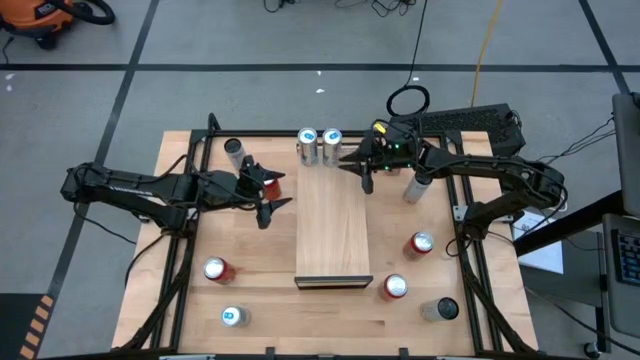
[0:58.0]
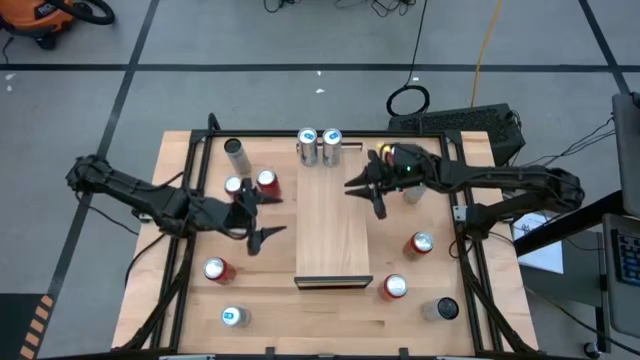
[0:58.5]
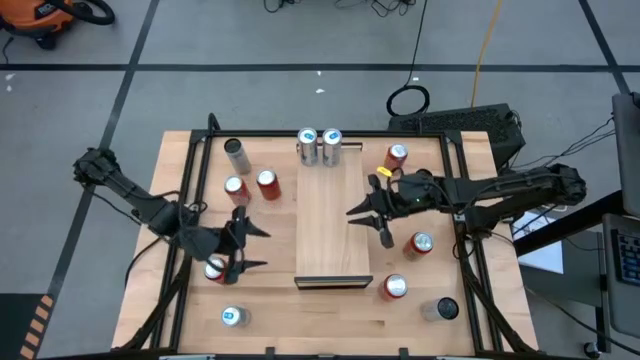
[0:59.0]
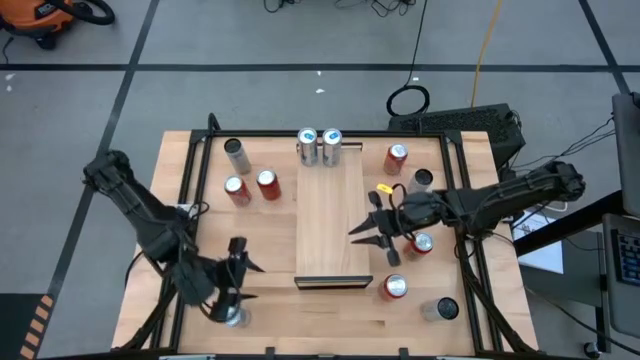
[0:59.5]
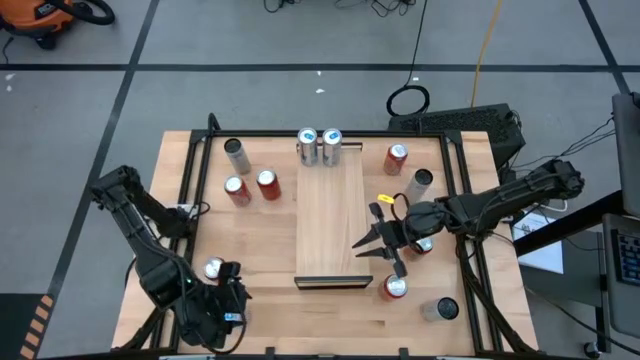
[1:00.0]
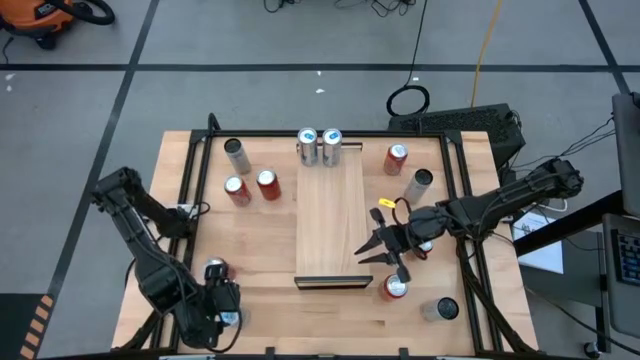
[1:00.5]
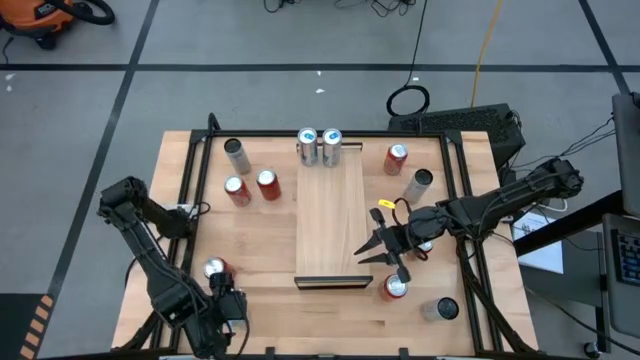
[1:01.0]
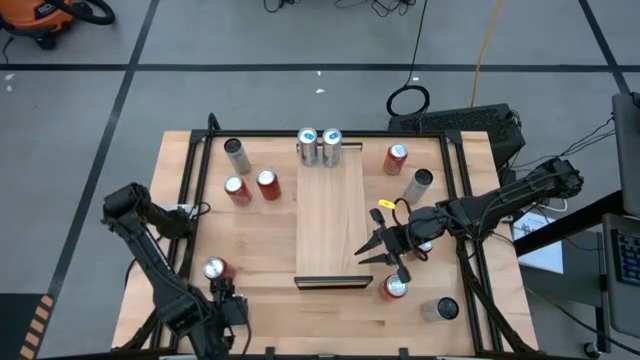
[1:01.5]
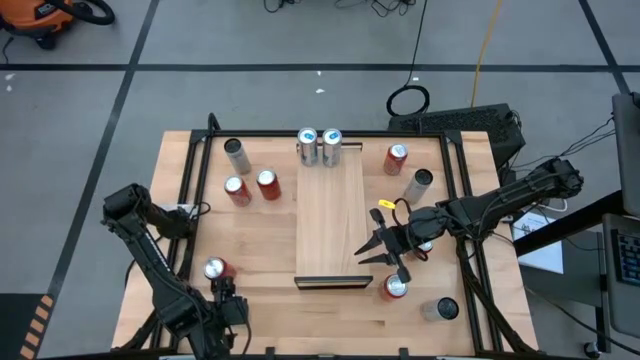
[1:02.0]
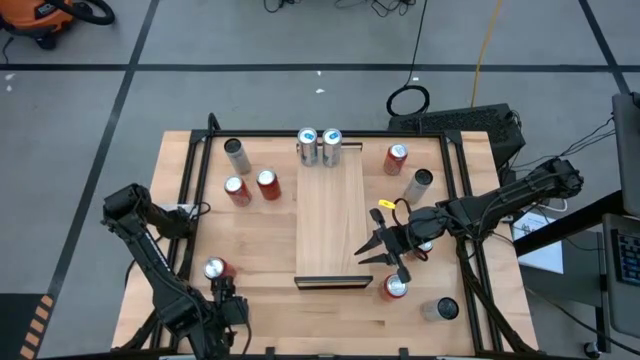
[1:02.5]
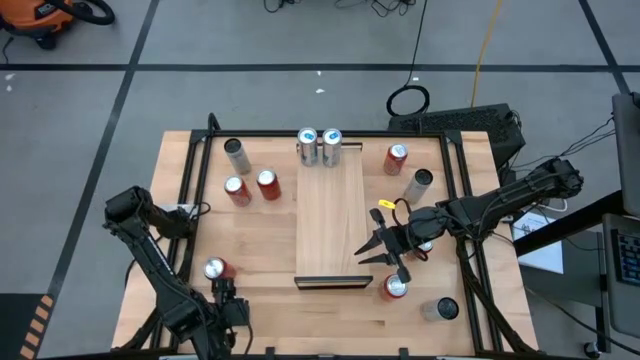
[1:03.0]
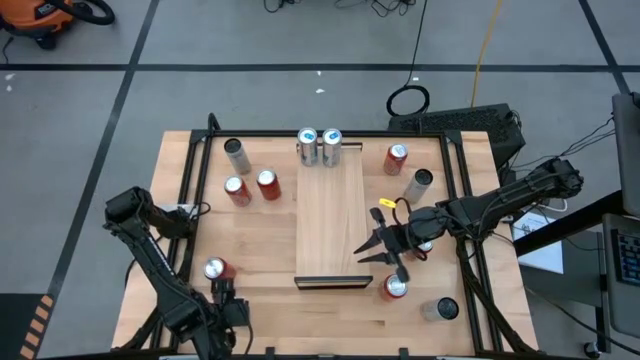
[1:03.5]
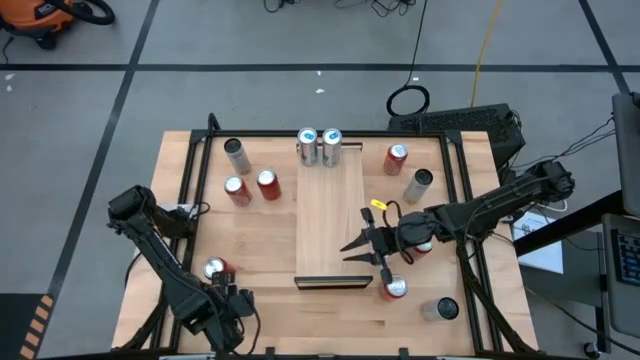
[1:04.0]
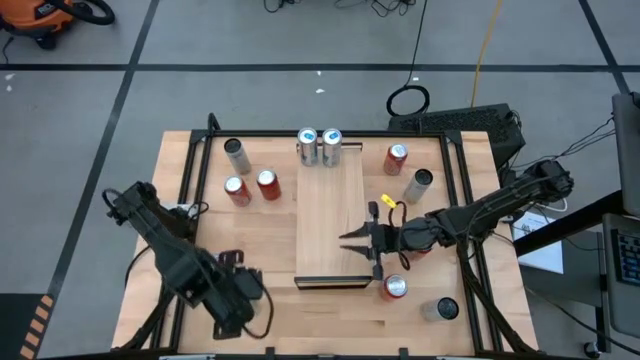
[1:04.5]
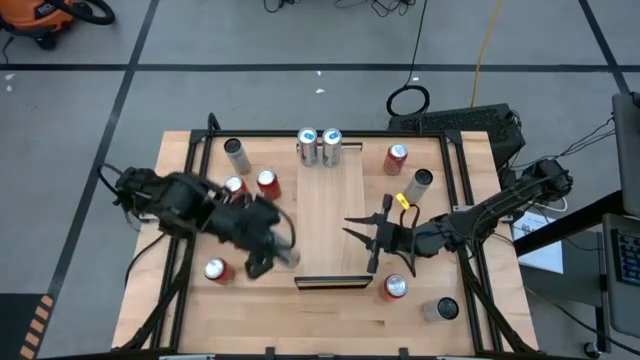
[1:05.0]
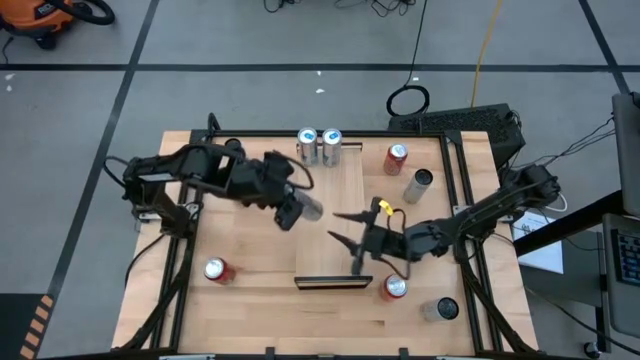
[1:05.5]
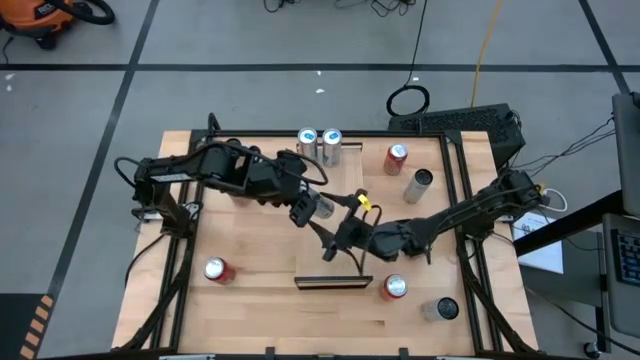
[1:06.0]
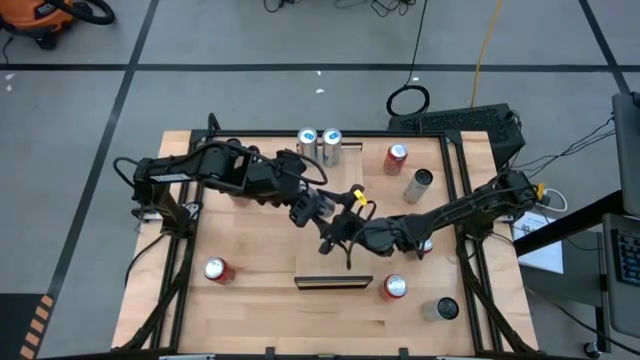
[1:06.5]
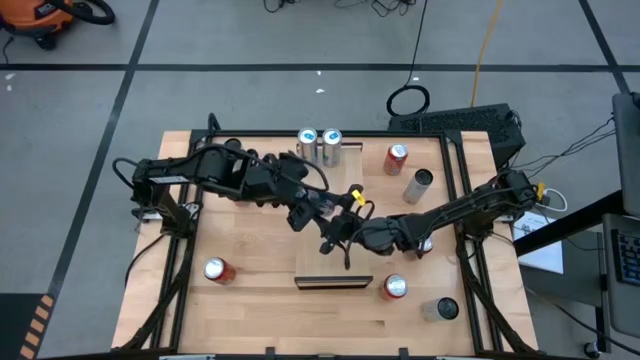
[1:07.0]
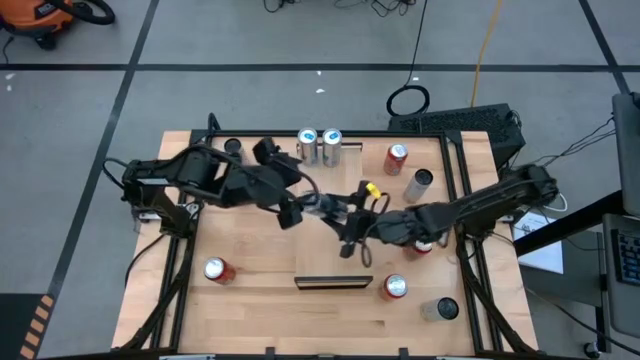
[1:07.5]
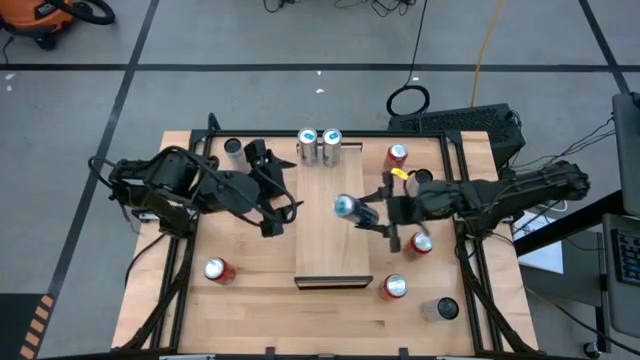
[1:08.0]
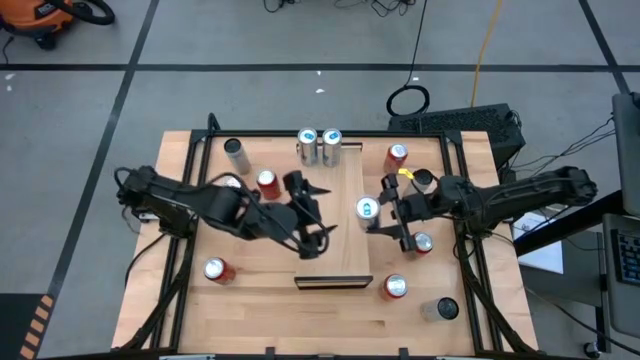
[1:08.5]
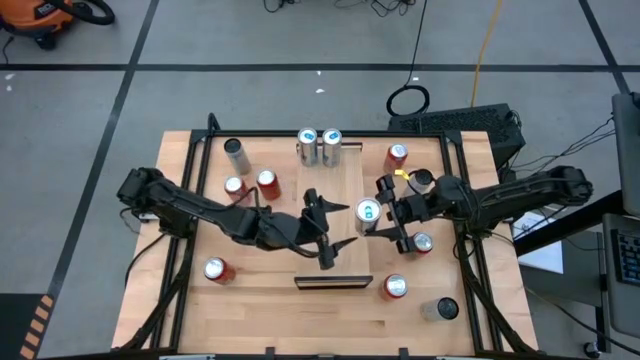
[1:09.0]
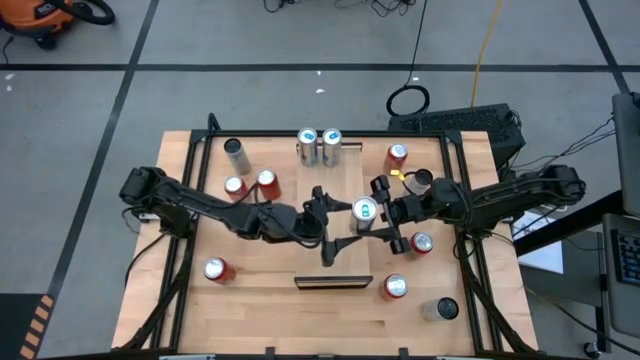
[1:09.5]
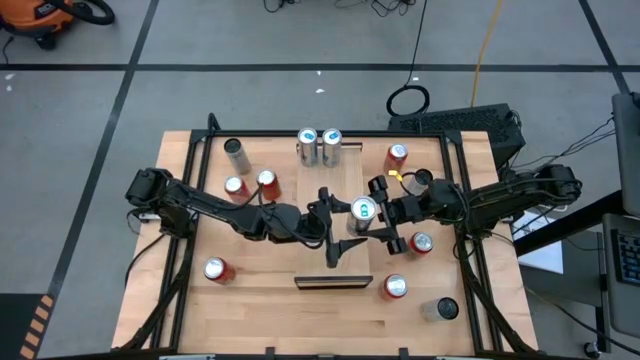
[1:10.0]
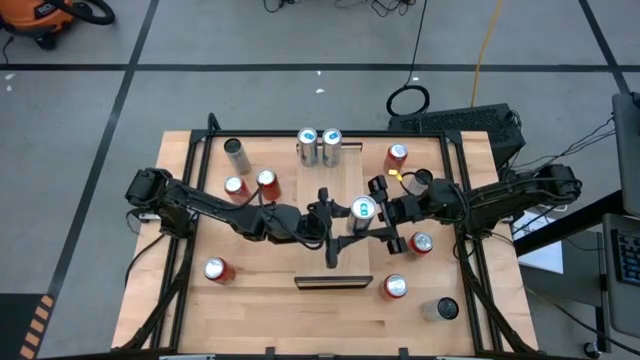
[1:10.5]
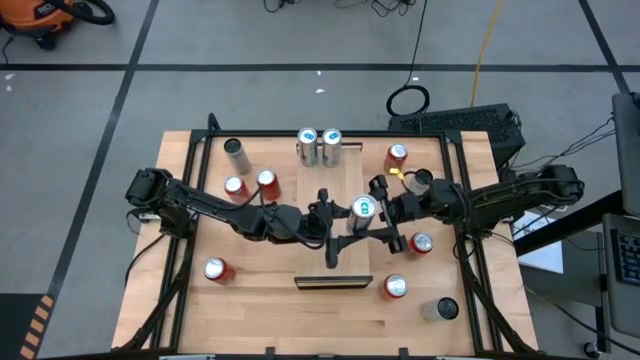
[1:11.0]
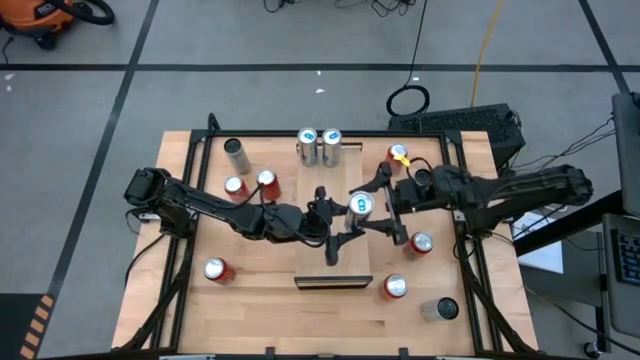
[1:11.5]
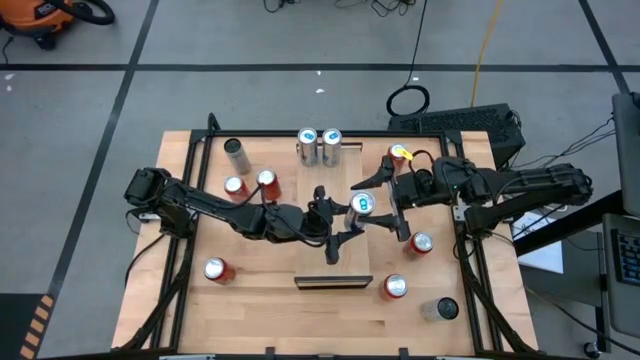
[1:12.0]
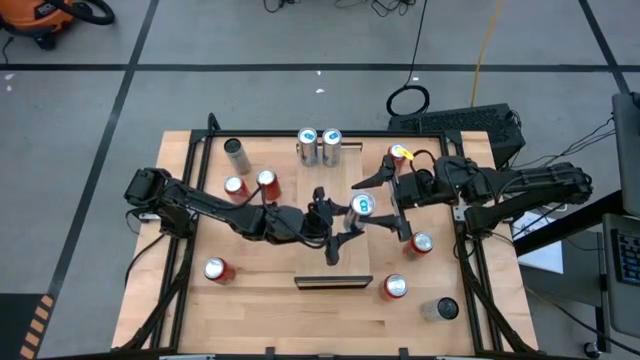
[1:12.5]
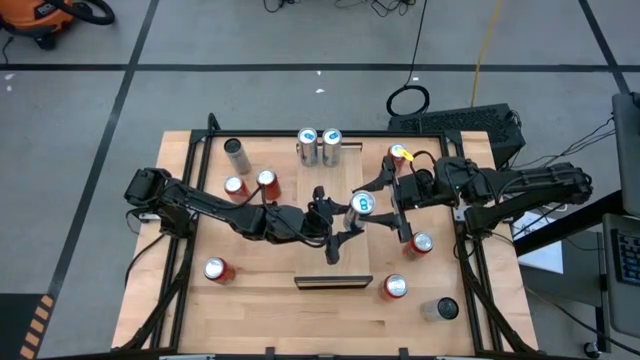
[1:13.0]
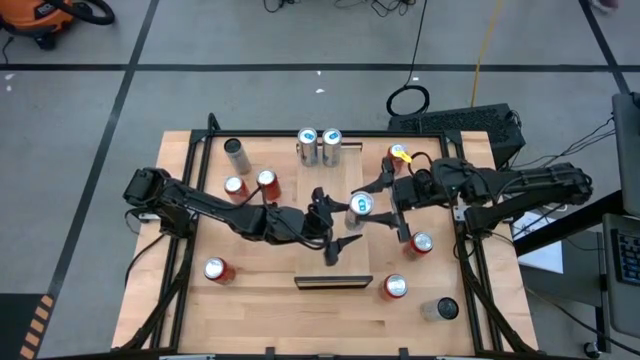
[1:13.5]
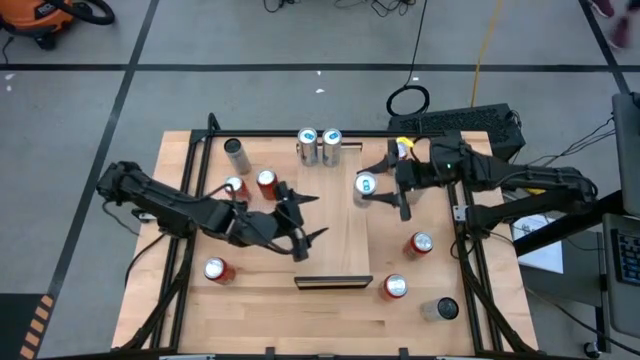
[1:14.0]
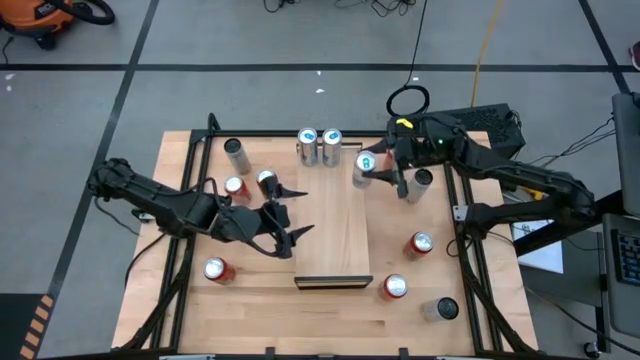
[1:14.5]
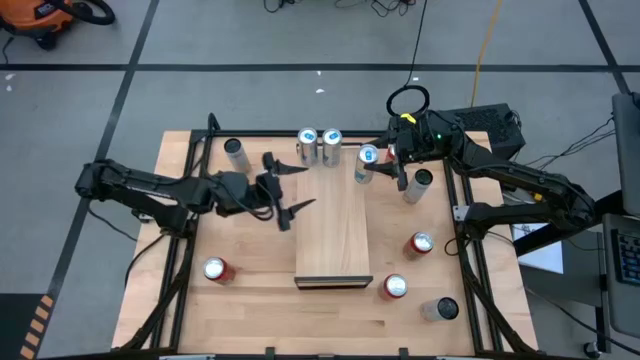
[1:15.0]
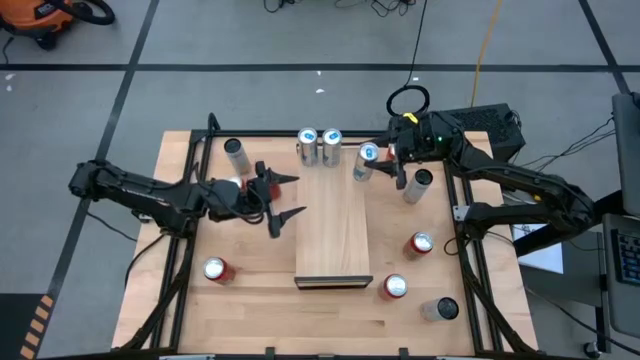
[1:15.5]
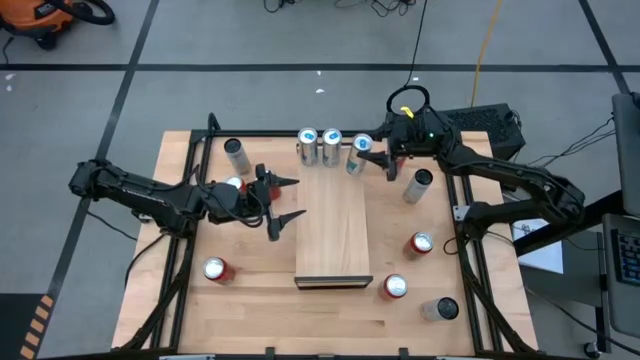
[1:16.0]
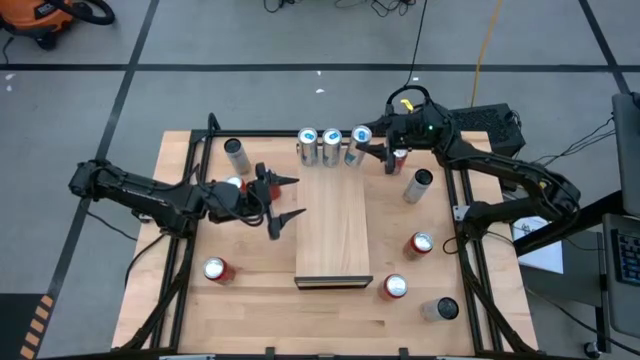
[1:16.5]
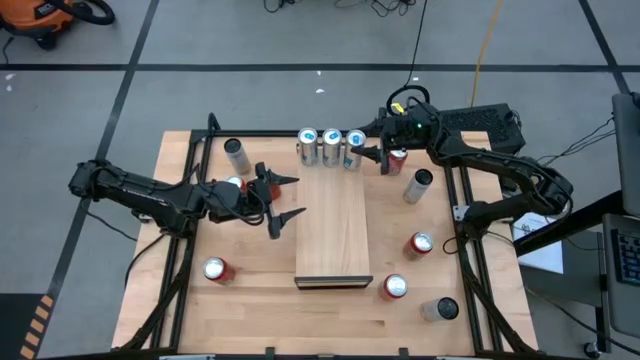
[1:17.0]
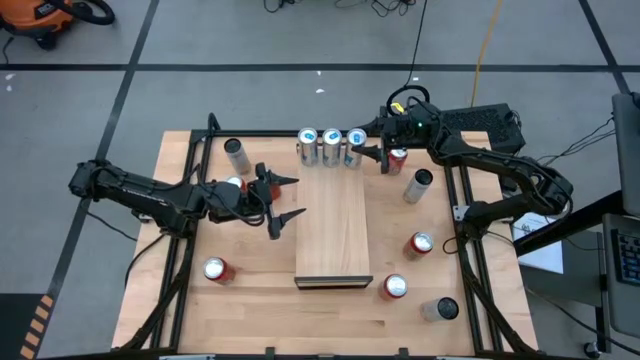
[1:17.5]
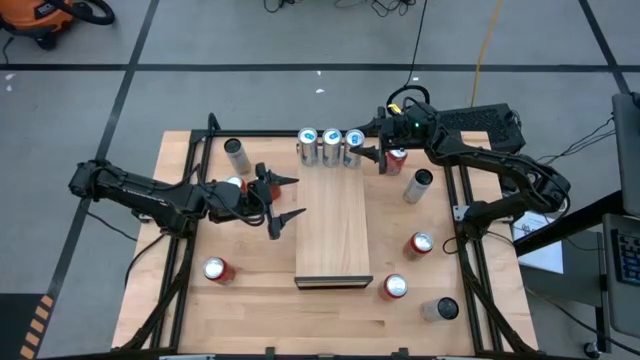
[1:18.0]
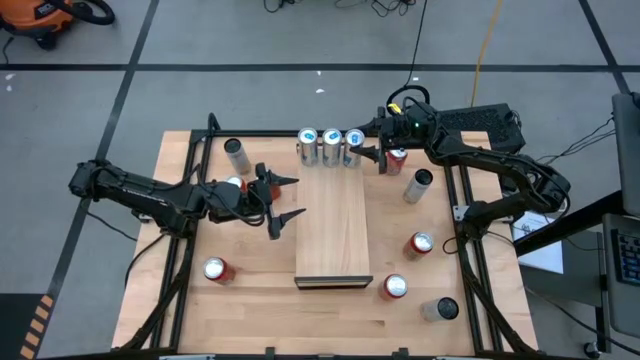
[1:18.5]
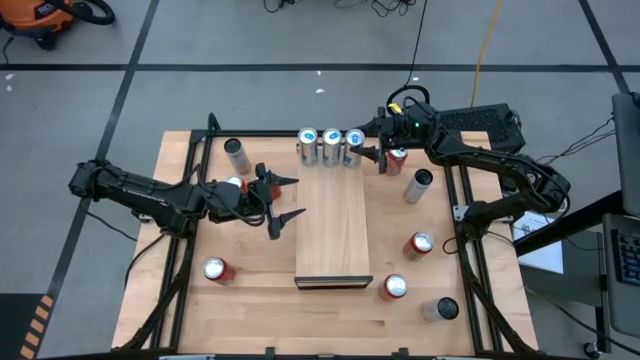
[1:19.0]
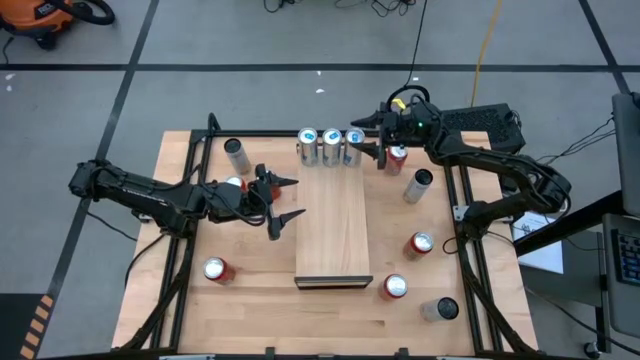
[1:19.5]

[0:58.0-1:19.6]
Task: Place canned beverage on shelf
Put the blue soda can on the shelf aligned with the other blue soda can
